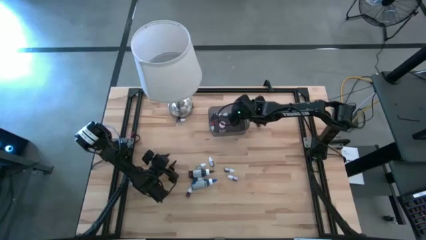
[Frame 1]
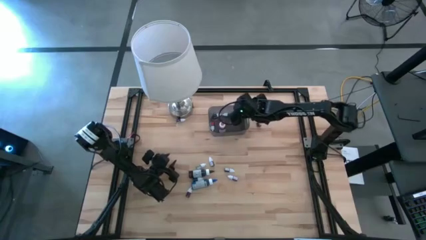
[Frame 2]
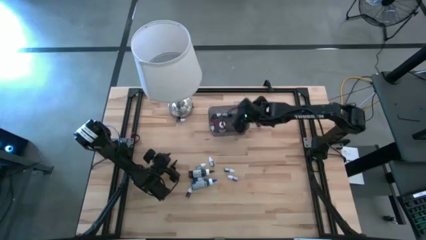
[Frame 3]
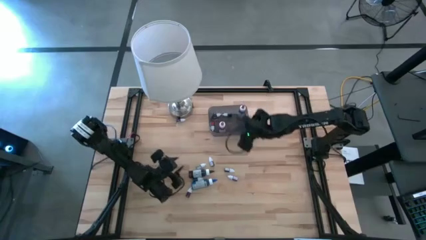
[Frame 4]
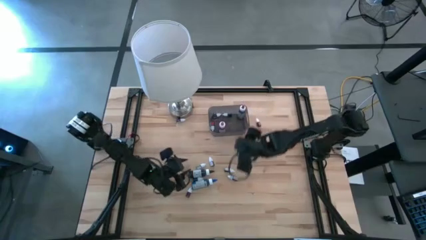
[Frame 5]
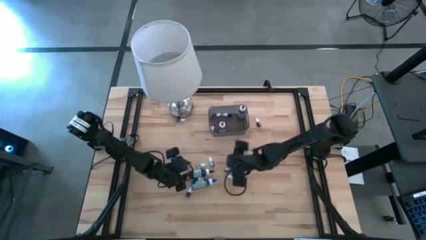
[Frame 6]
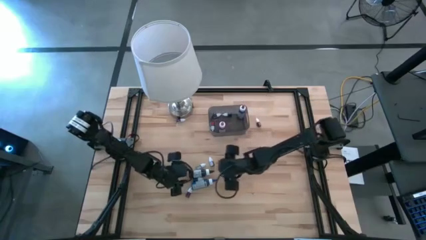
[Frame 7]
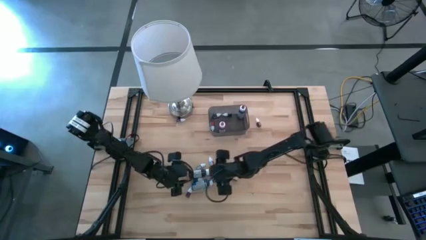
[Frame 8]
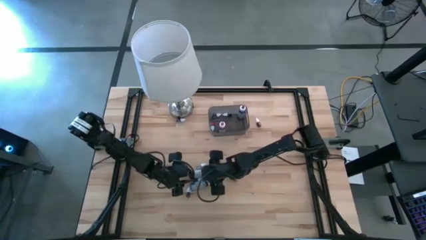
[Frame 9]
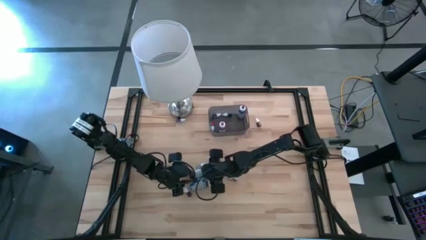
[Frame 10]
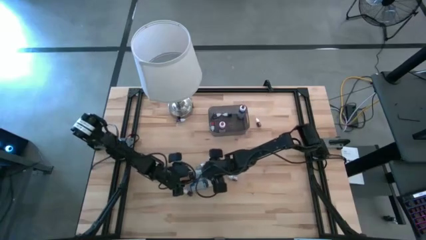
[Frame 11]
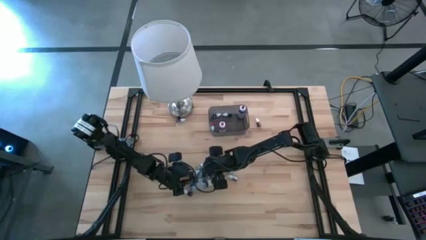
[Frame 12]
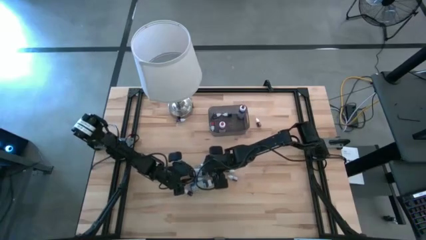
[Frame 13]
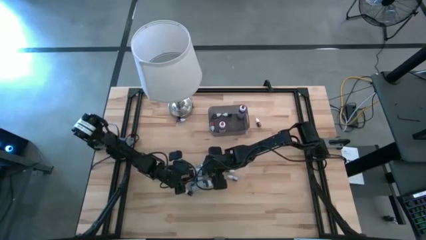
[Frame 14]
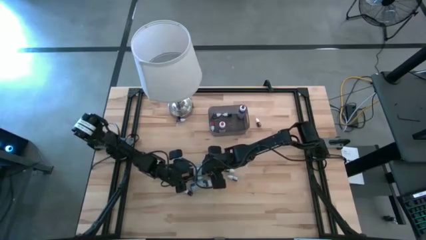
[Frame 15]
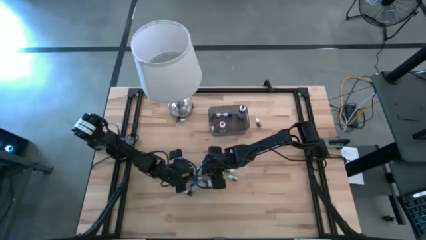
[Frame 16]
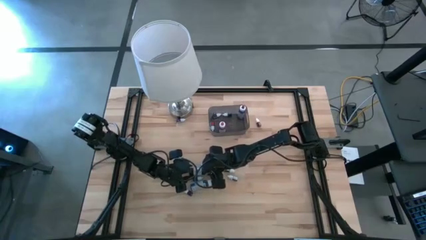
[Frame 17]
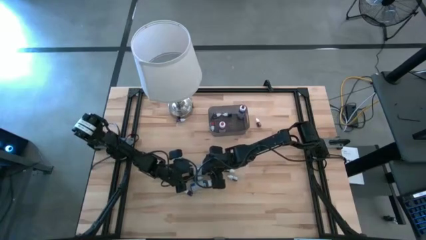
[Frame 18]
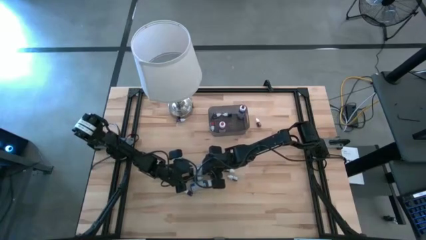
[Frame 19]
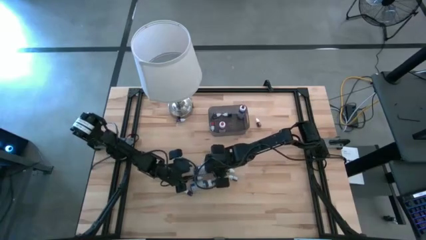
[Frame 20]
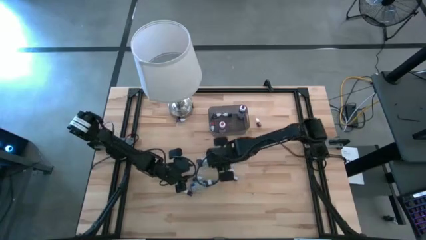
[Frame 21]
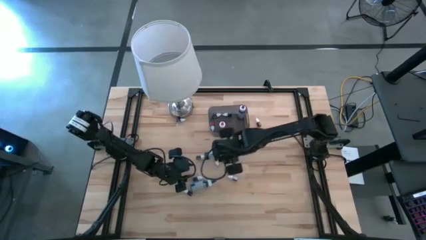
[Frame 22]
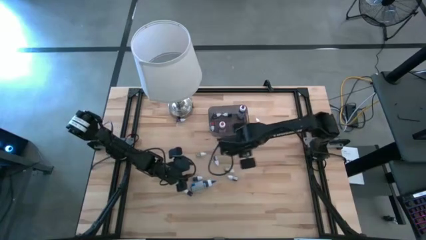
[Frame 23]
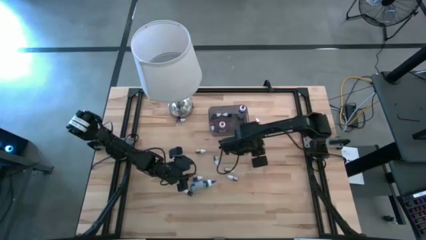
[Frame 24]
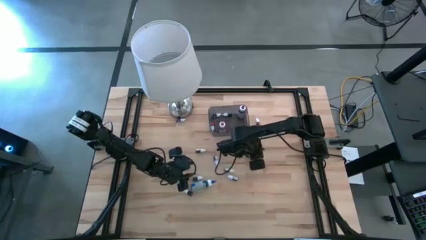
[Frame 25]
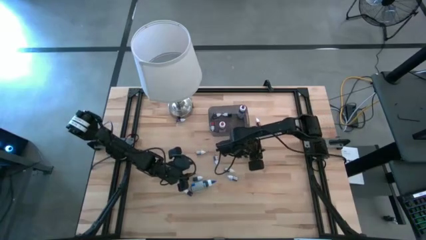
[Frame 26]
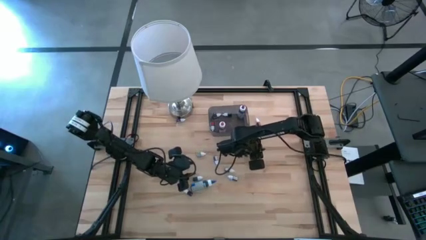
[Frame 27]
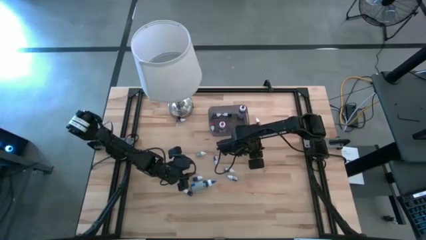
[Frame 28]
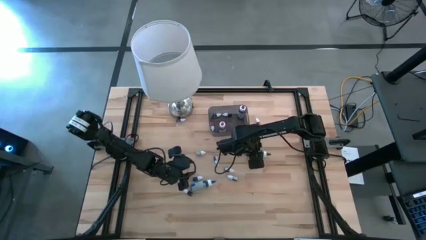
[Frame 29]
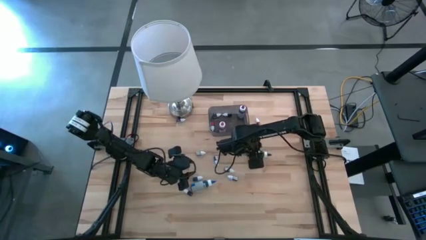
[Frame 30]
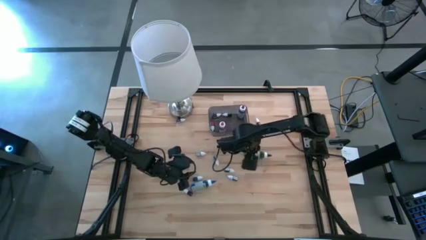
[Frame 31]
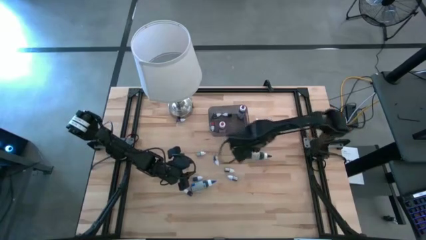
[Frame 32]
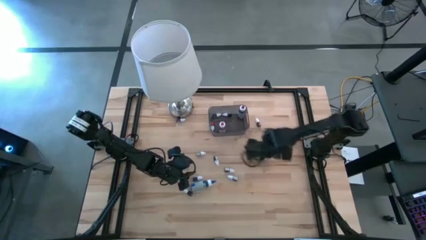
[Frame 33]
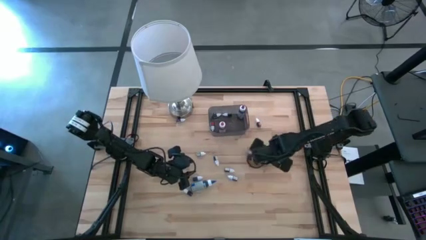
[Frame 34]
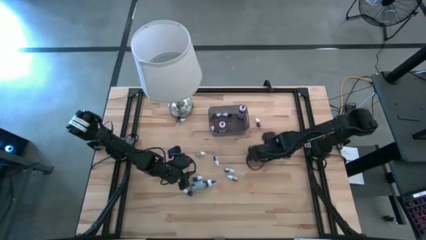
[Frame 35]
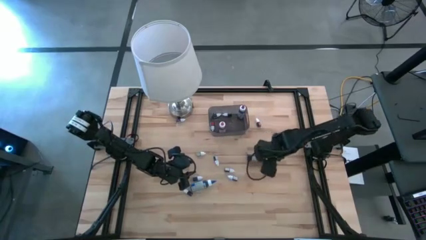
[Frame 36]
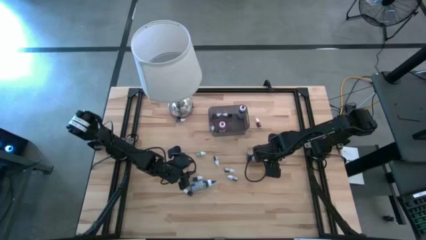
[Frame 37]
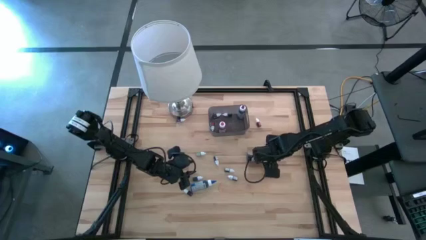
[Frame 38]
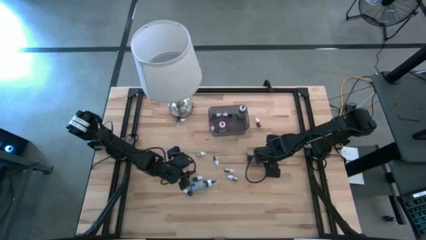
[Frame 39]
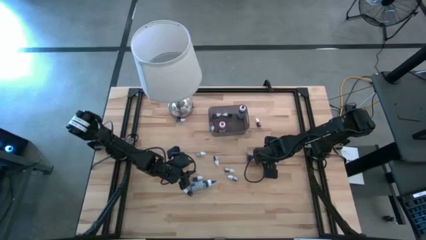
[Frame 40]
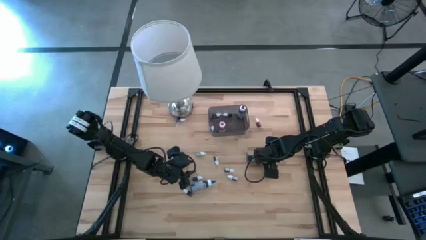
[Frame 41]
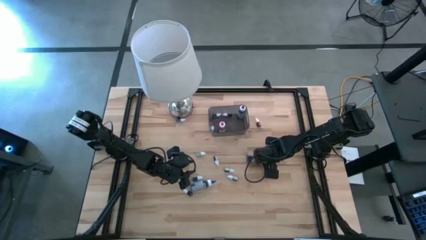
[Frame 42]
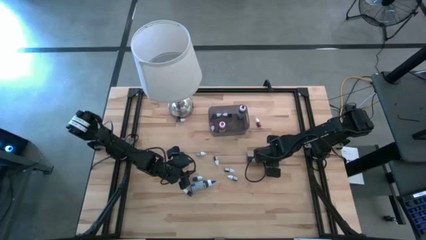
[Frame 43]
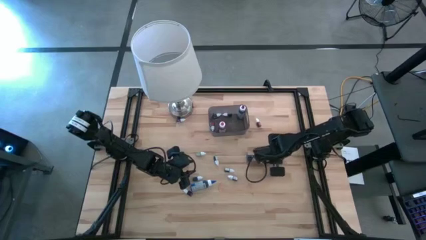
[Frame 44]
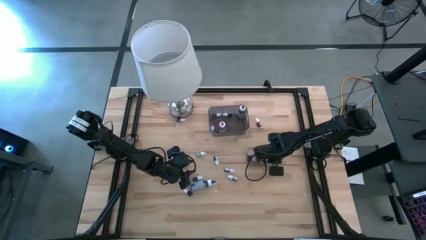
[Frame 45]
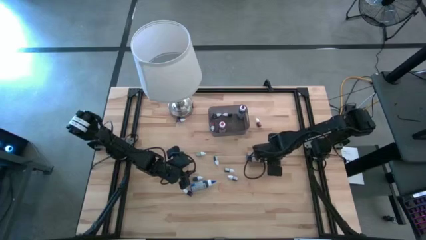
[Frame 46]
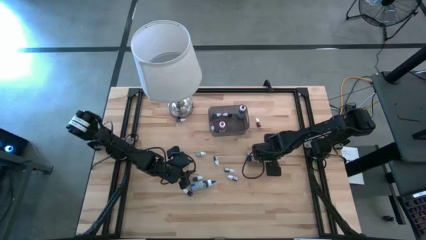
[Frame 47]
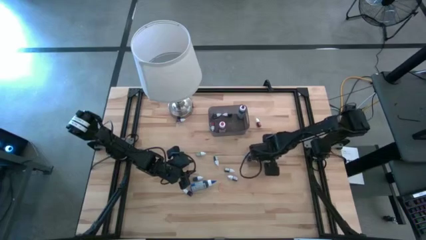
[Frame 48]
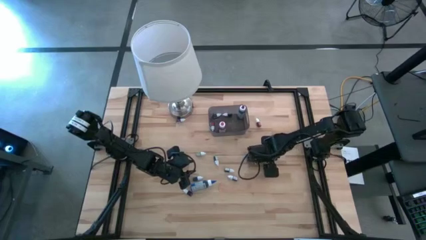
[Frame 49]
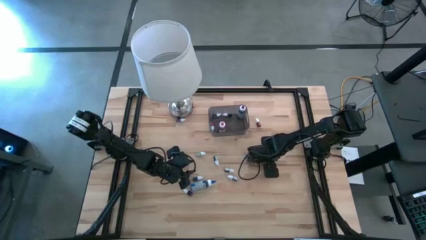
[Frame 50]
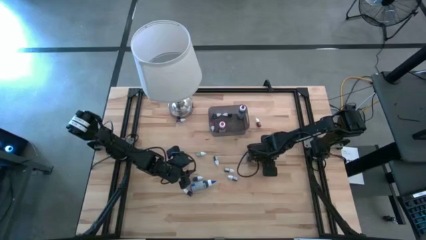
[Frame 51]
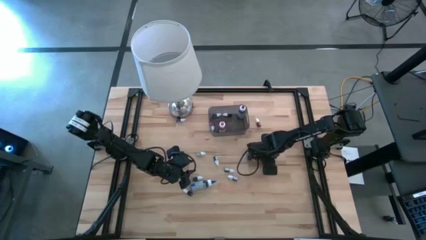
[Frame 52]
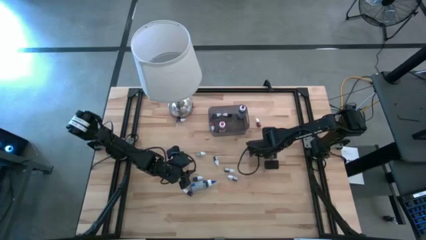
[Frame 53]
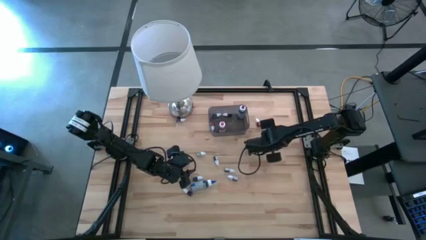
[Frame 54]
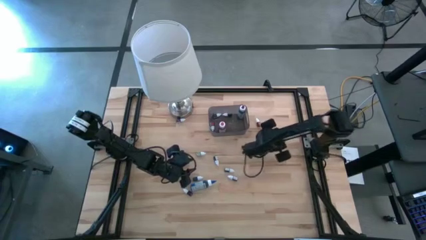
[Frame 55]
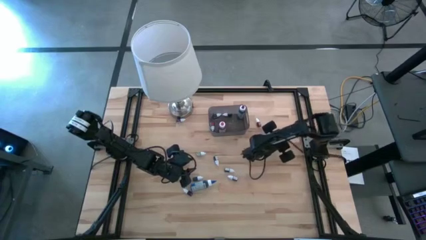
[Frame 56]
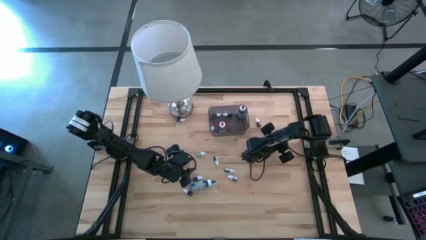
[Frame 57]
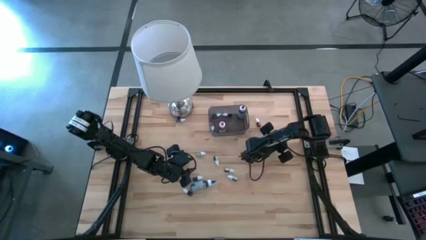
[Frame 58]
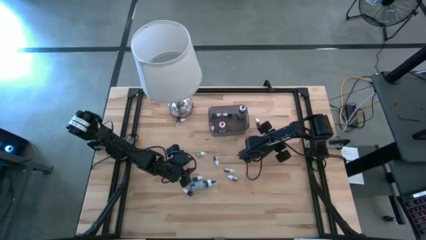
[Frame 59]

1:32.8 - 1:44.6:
Task: Pick & Place food coloring
Put the large black food coloring bottle into the bin

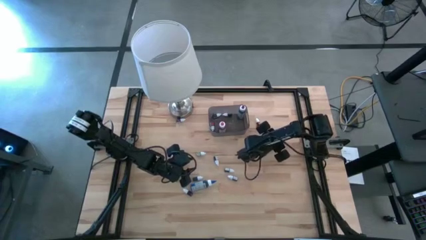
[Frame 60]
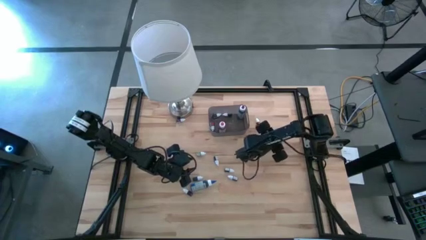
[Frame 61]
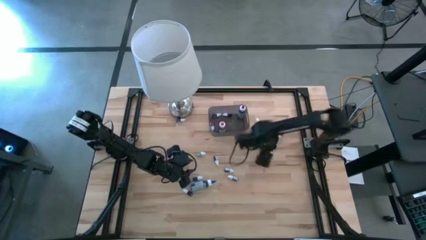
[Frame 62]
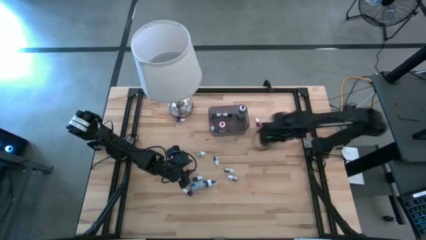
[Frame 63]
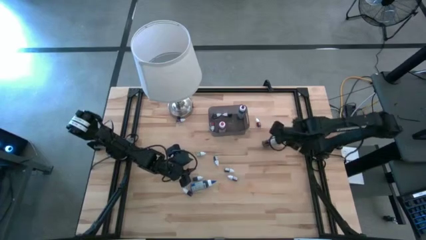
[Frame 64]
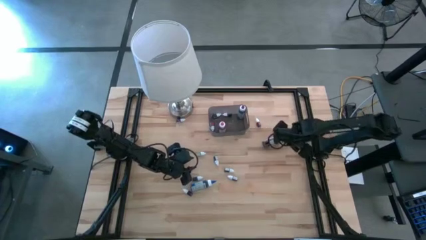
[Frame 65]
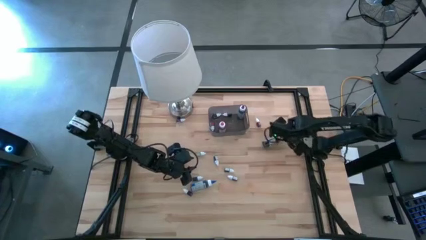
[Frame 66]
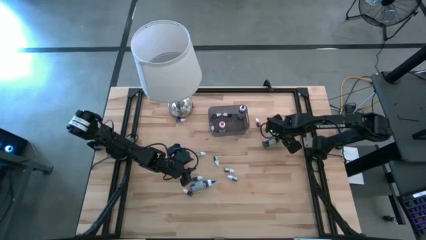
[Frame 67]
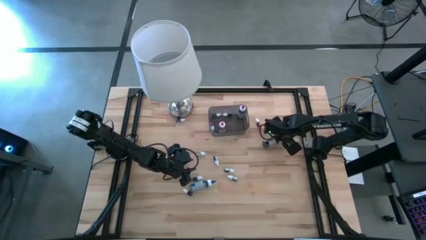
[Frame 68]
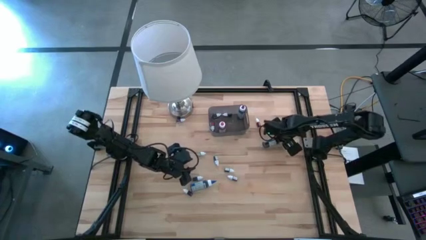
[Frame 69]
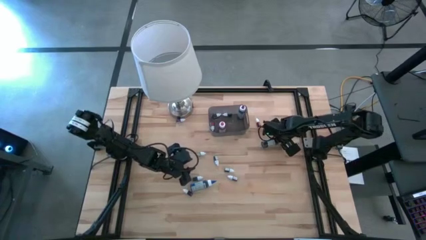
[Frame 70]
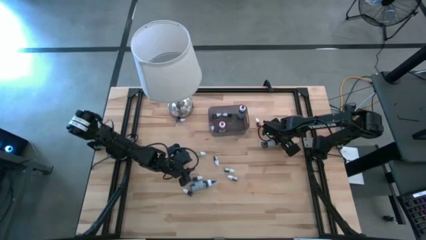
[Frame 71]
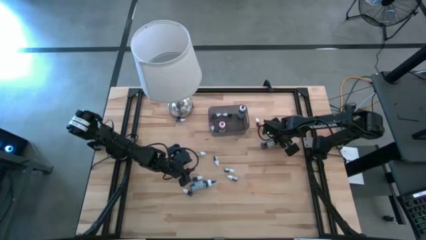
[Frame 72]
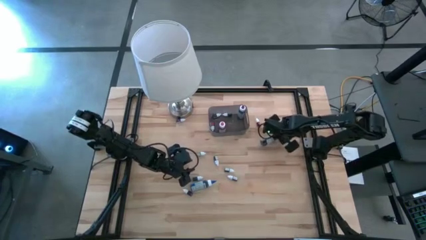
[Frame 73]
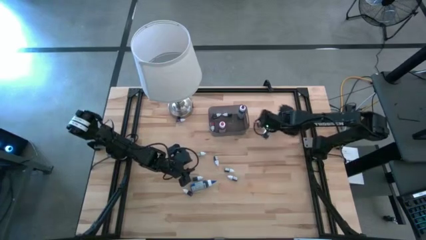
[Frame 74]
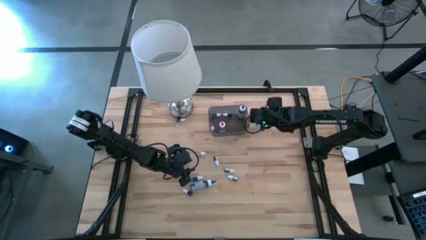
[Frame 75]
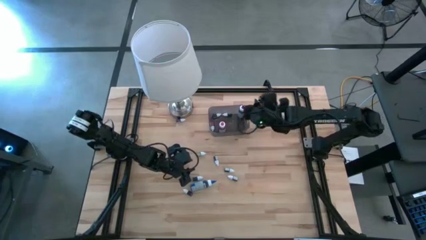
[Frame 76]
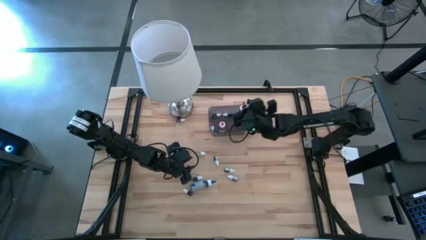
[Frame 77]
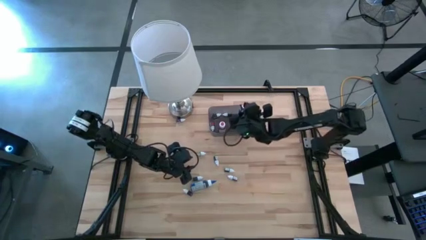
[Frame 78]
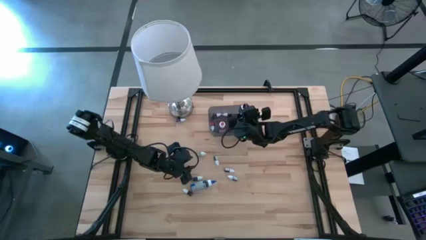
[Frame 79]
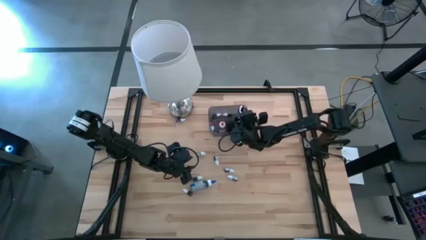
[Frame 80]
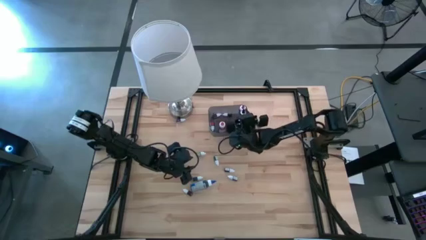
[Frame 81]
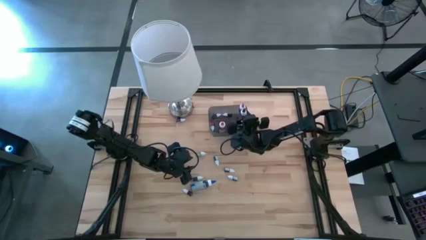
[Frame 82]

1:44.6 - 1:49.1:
Put the large black food coloring bottle into the bin
